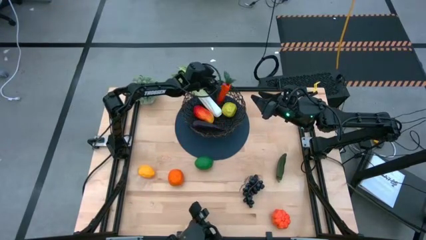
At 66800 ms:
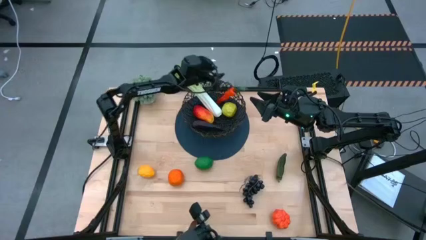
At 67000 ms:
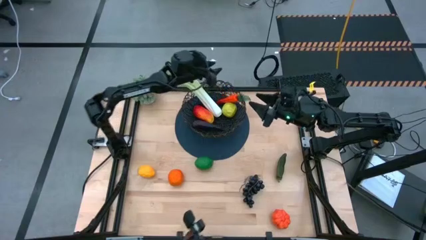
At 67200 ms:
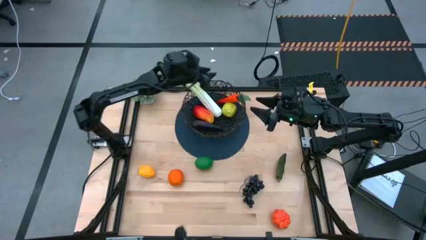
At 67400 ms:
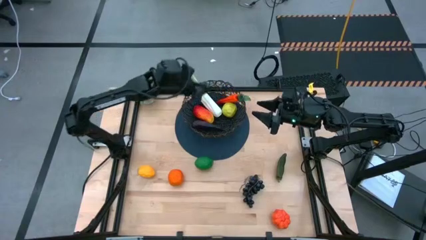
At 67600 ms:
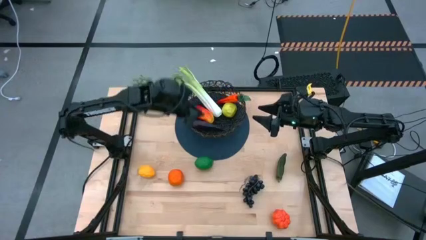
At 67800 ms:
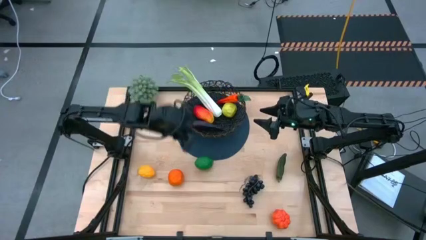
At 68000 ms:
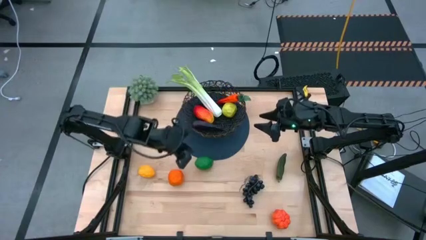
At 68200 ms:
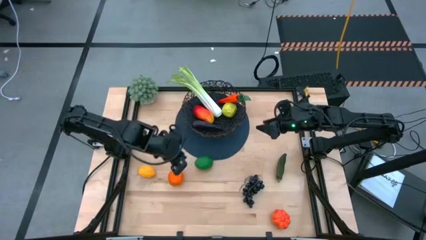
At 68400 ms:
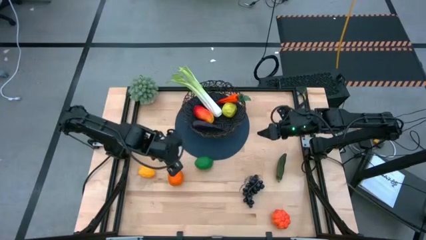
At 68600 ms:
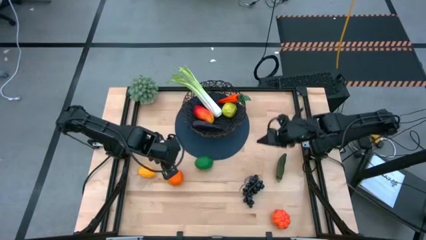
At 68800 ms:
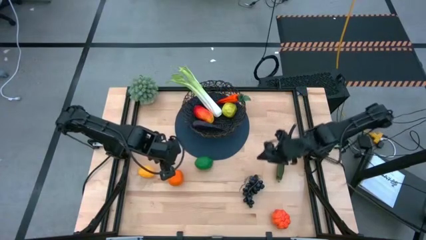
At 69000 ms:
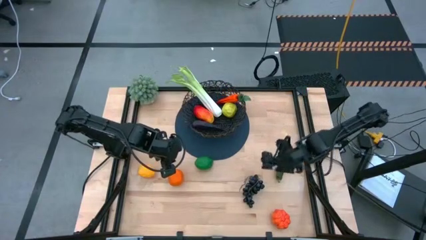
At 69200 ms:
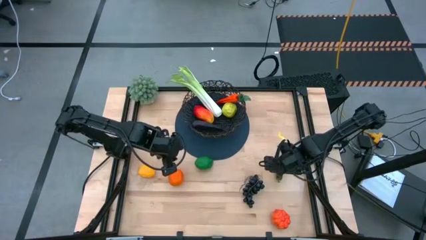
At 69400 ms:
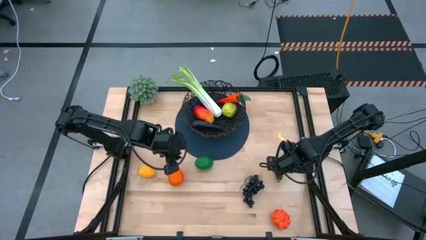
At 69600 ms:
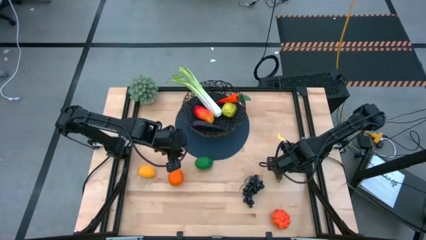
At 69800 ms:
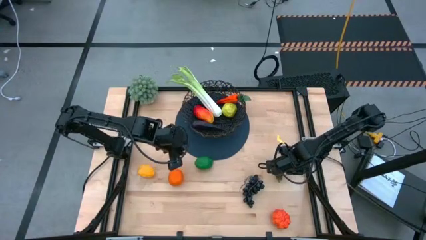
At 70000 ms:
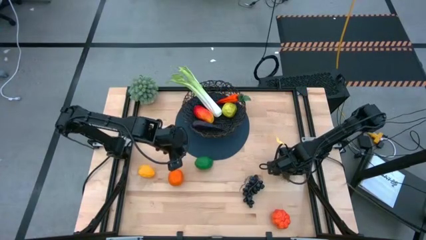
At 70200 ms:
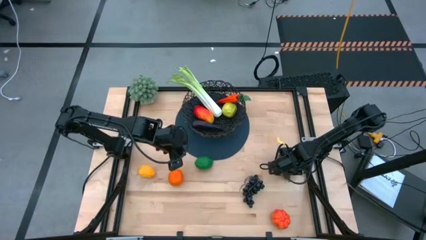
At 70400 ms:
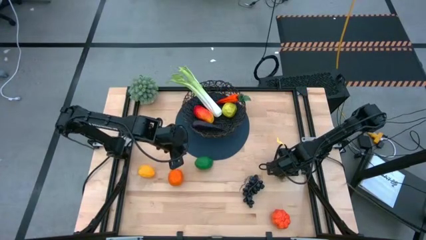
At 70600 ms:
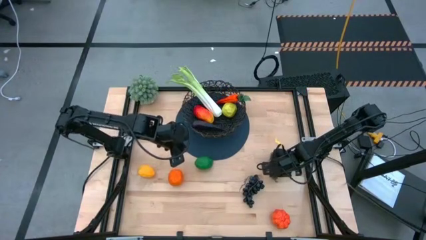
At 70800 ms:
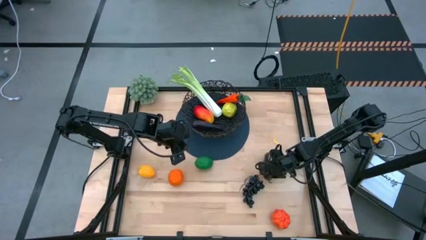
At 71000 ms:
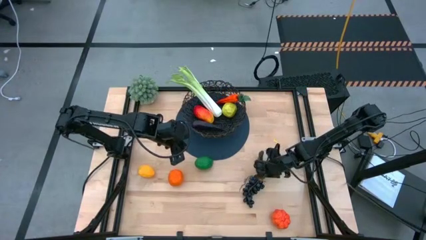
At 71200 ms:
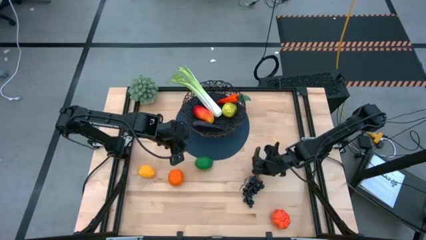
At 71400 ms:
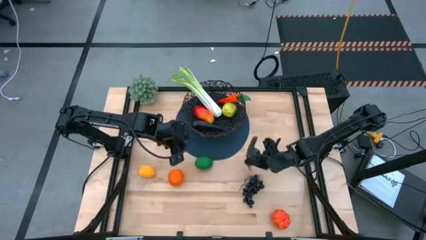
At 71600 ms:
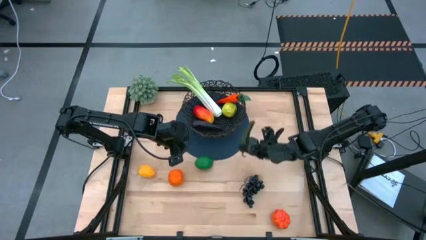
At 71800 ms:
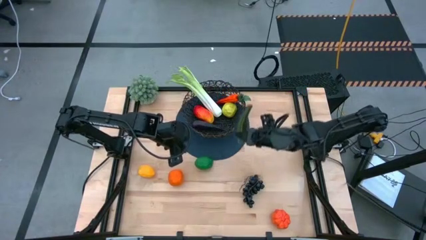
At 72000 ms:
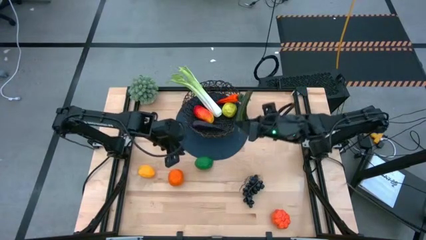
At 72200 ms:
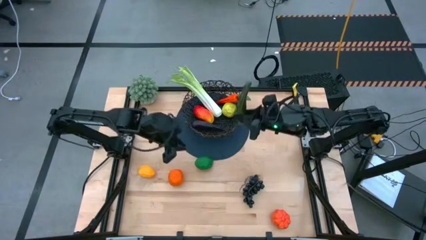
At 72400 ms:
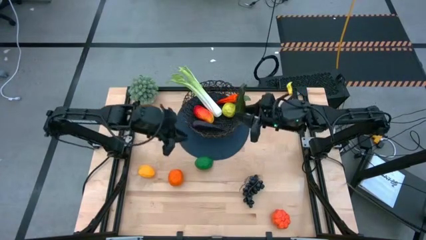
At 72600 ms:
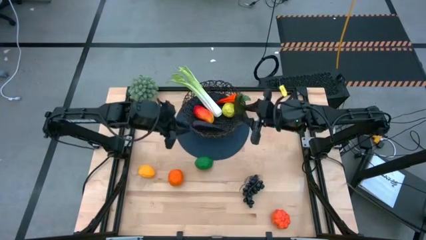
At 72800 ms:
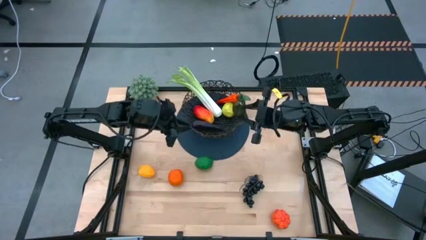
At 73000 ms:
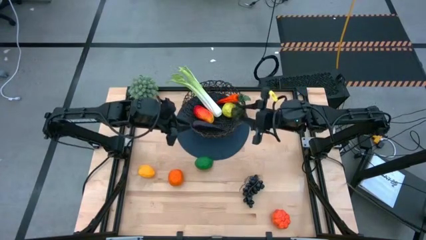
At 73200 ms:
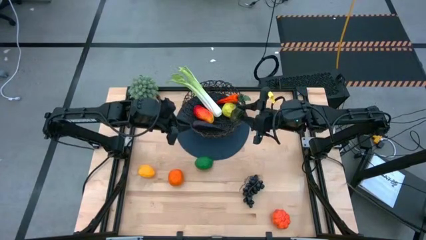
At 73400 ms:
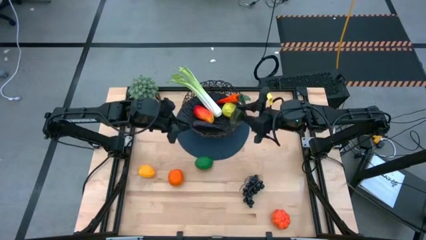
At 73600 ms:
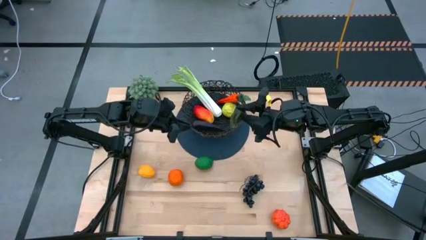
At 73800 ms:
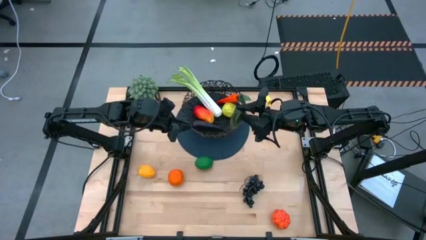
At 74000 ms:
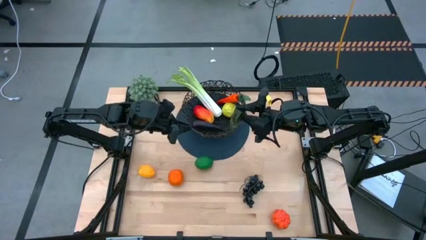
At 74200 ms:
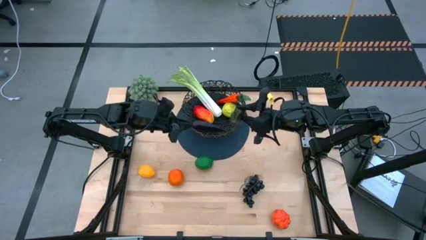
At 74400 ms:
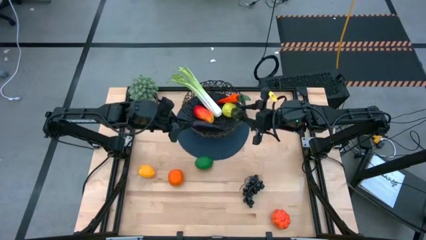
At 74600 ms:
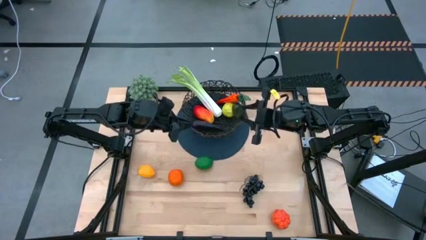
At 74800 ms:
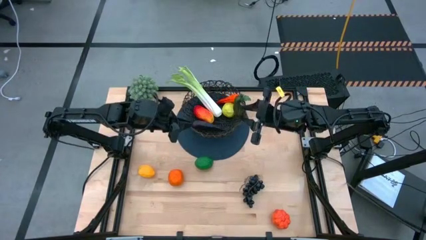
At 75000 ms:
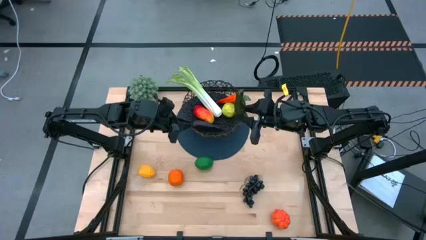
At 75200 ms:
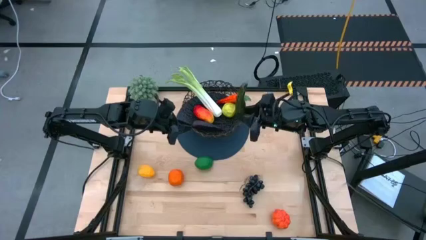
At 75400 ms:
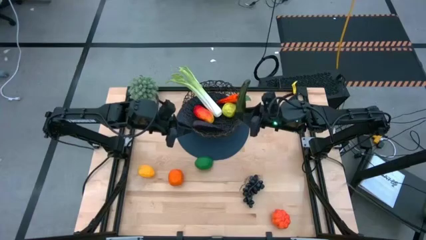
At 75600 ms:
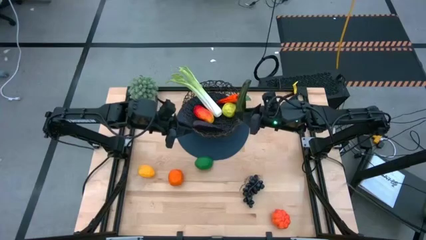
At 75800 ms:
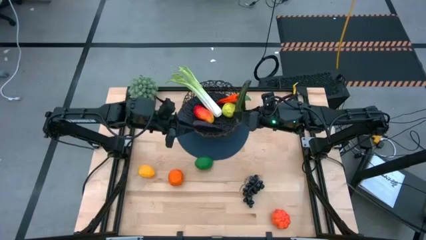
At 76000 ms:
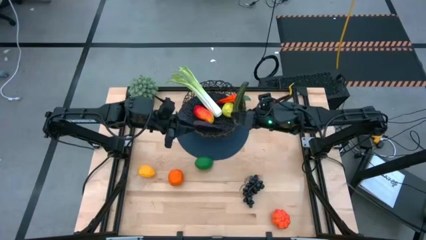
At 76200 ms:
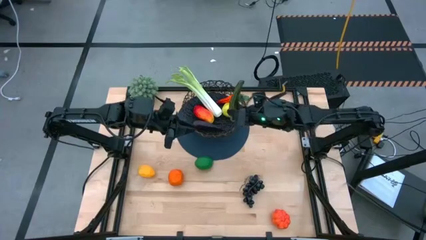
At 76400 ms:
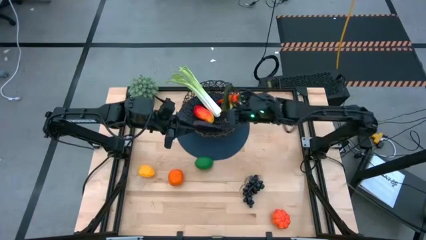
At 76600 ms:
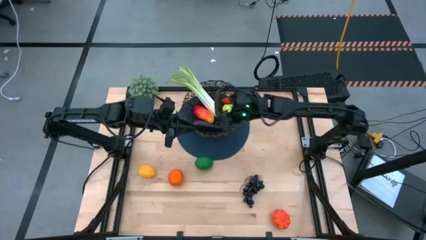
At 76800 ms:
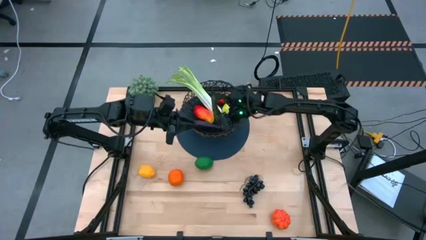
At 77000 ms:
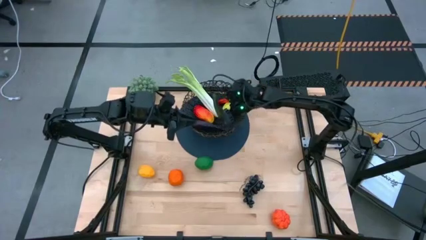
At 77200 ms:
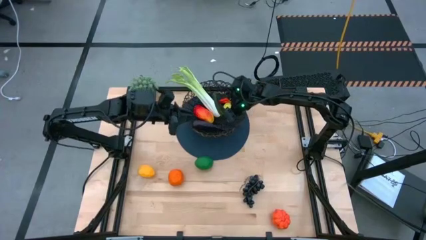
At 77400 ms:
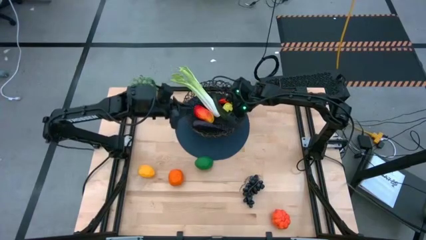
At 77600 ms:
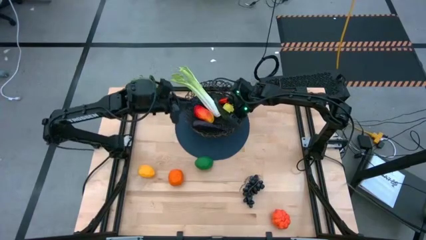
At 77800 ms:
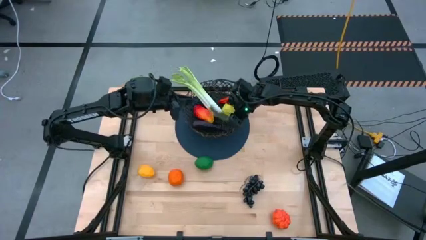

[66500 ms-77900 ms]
Task: Build produce basket
Put the green chili pepper into the wire basket
